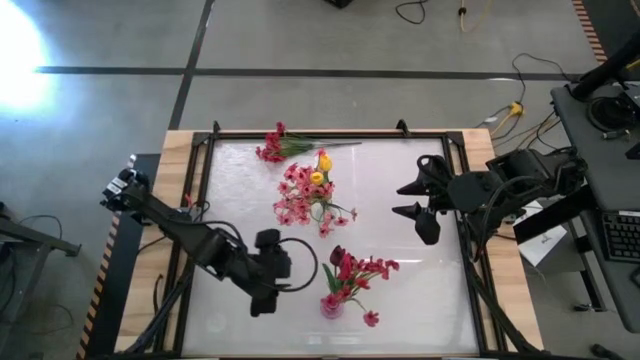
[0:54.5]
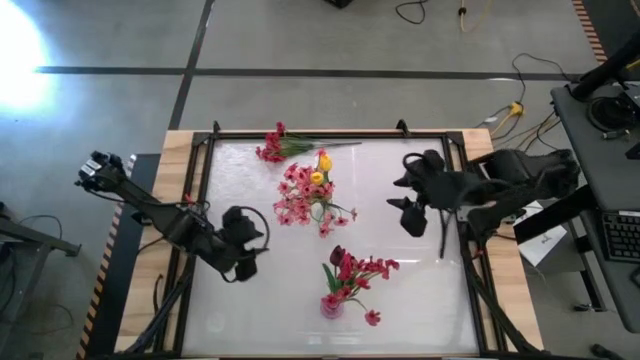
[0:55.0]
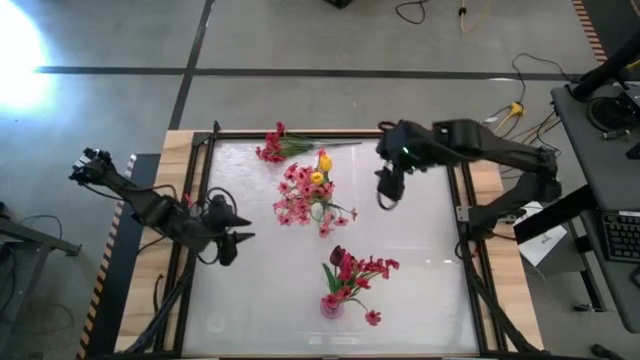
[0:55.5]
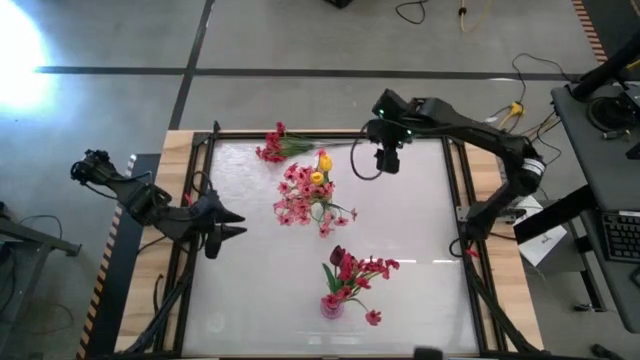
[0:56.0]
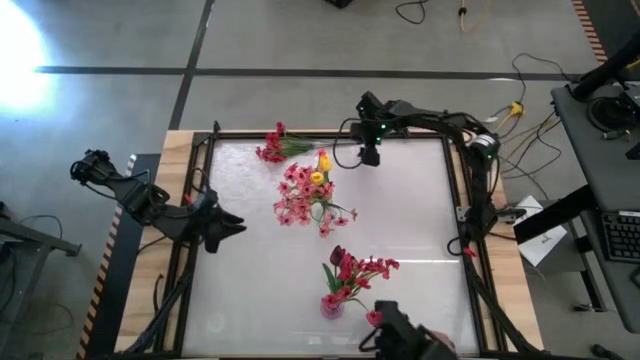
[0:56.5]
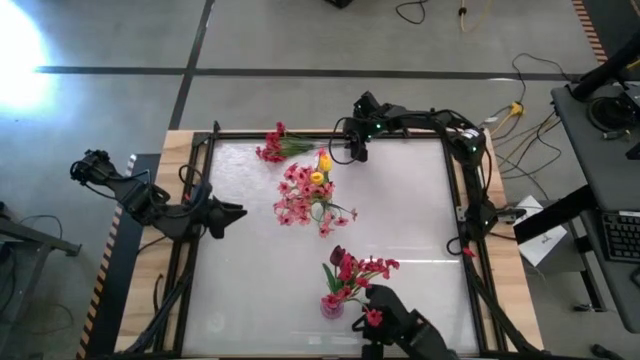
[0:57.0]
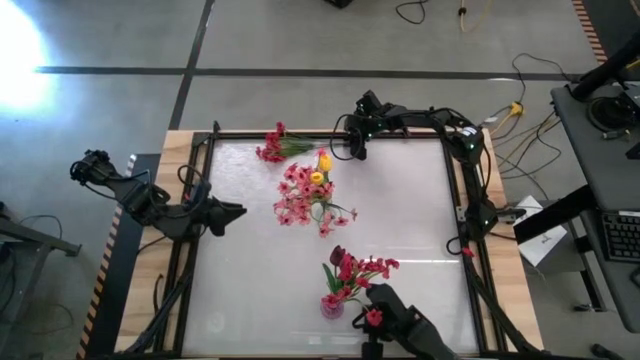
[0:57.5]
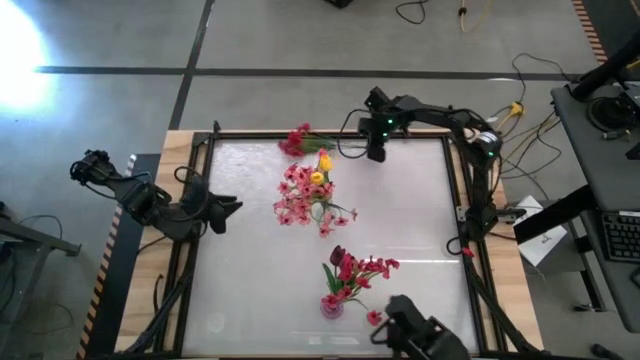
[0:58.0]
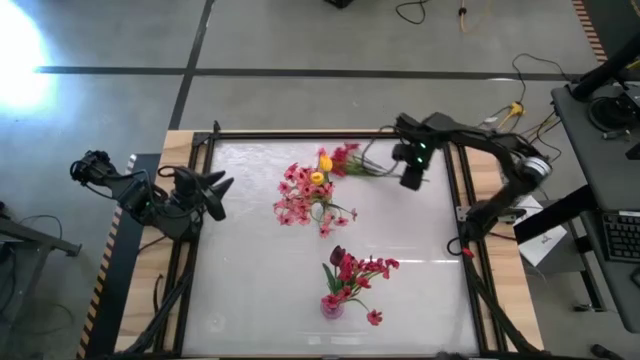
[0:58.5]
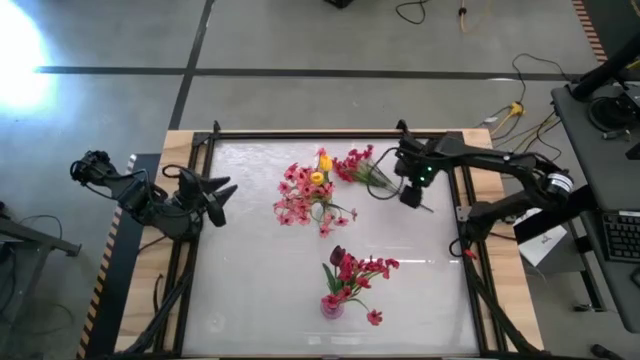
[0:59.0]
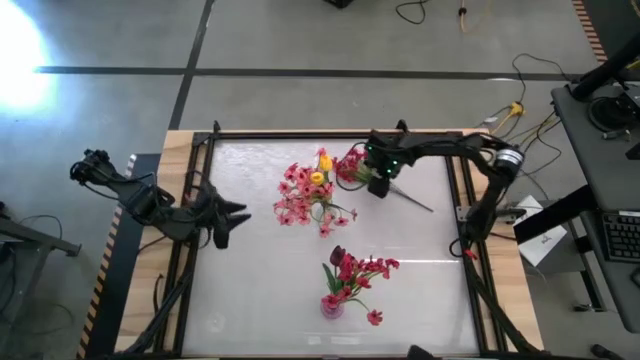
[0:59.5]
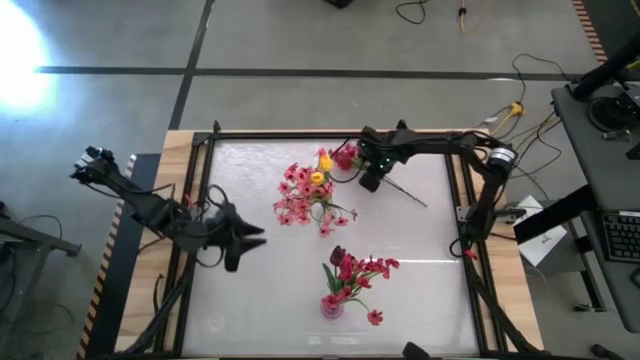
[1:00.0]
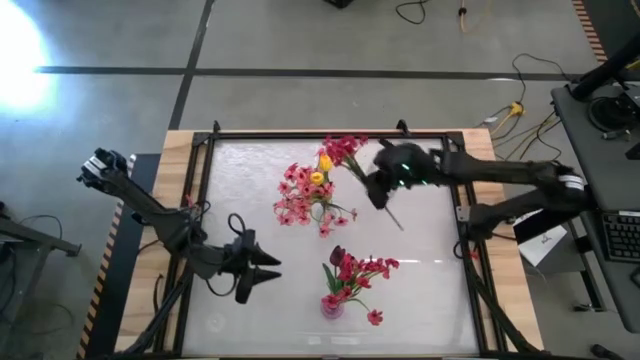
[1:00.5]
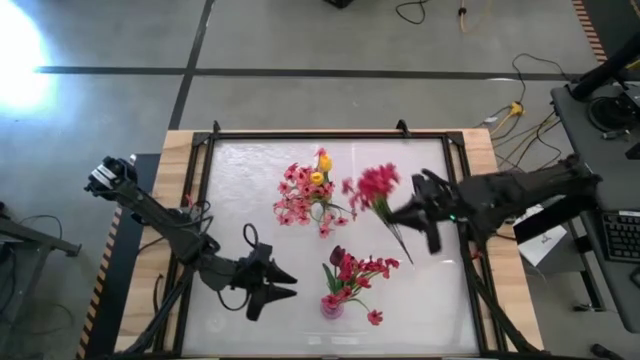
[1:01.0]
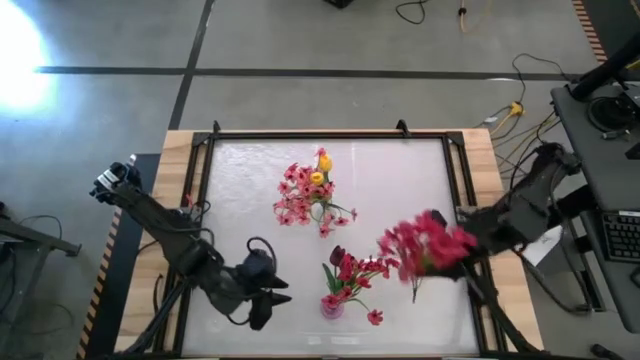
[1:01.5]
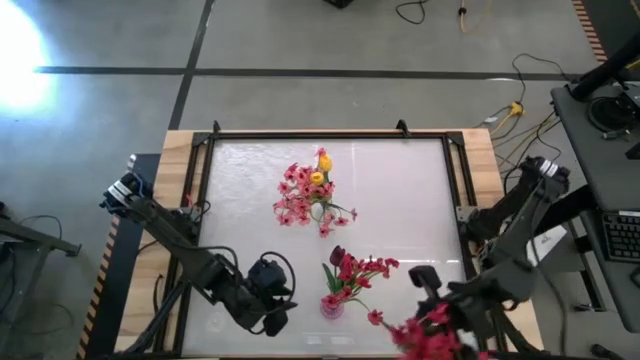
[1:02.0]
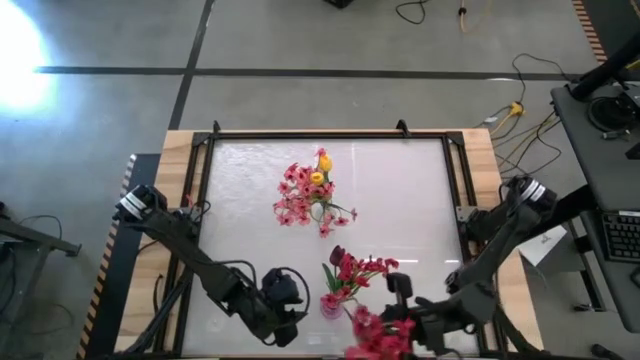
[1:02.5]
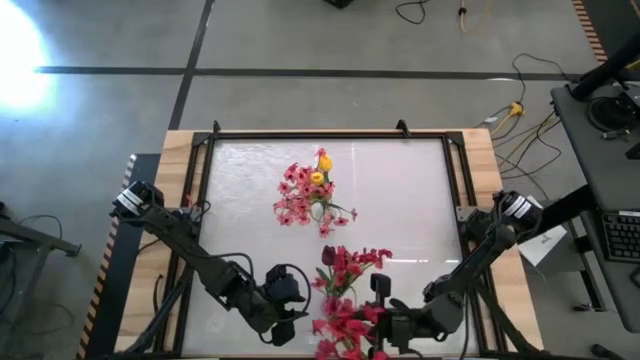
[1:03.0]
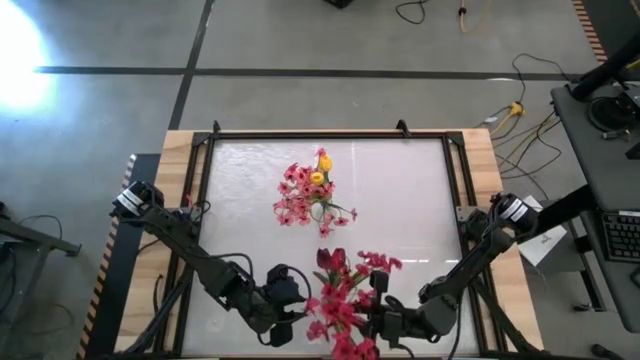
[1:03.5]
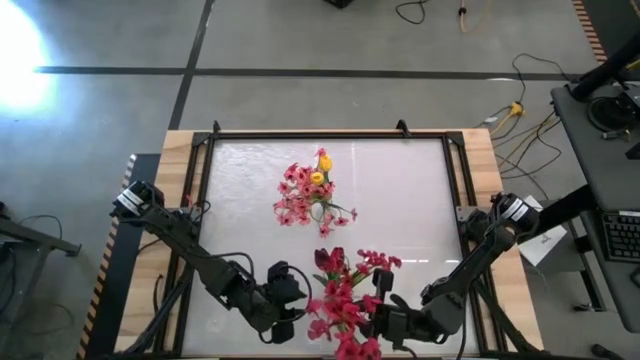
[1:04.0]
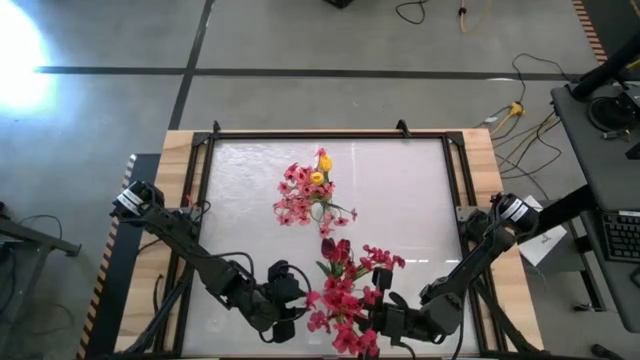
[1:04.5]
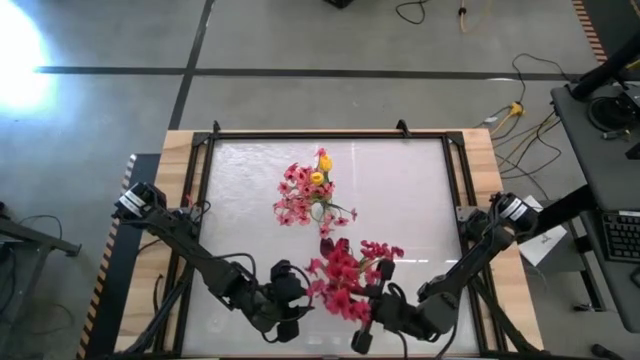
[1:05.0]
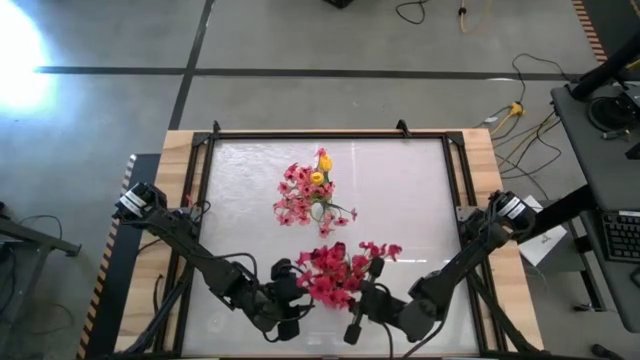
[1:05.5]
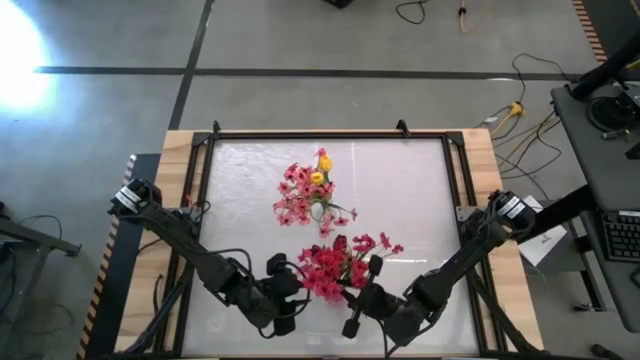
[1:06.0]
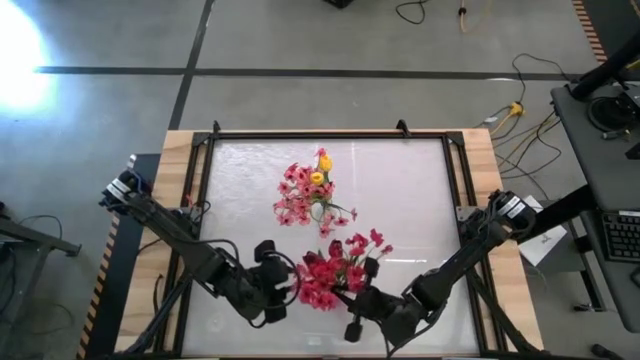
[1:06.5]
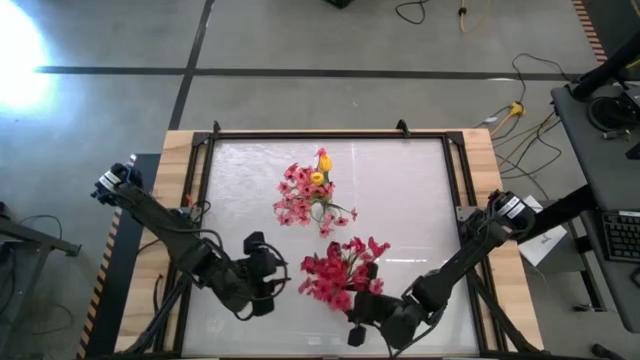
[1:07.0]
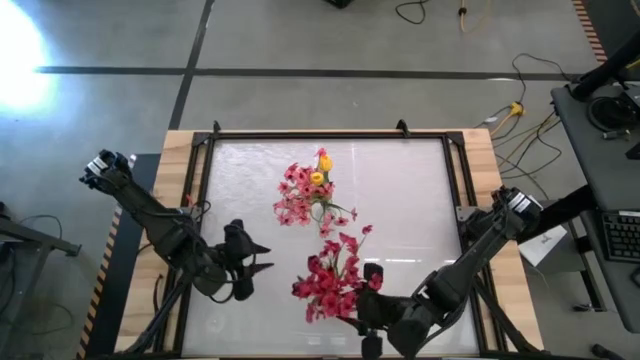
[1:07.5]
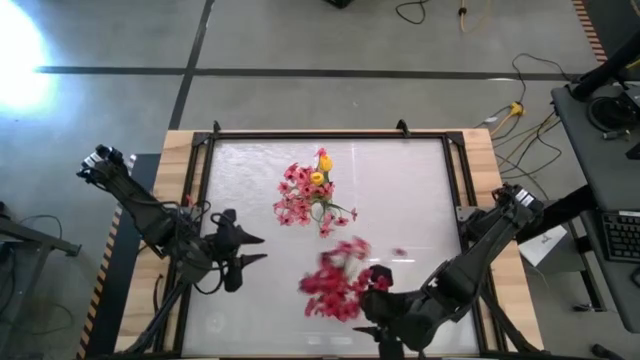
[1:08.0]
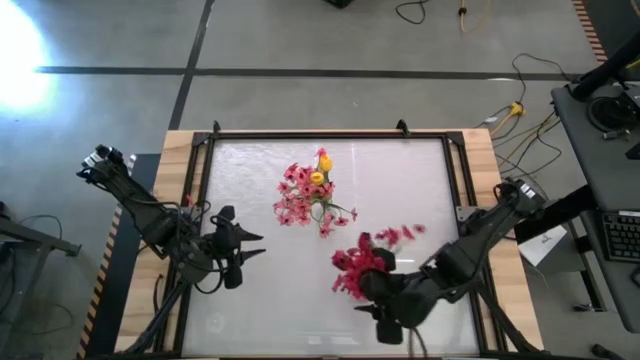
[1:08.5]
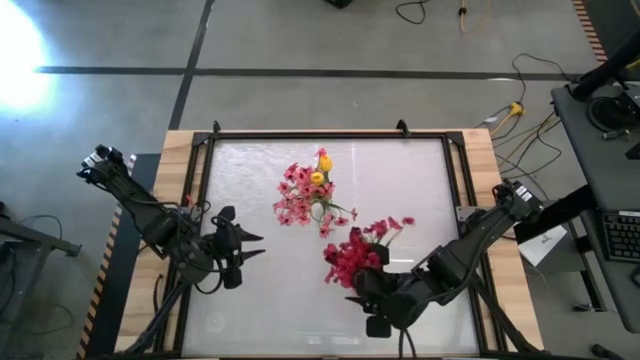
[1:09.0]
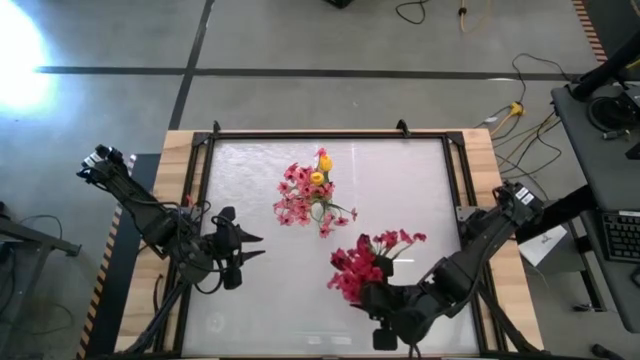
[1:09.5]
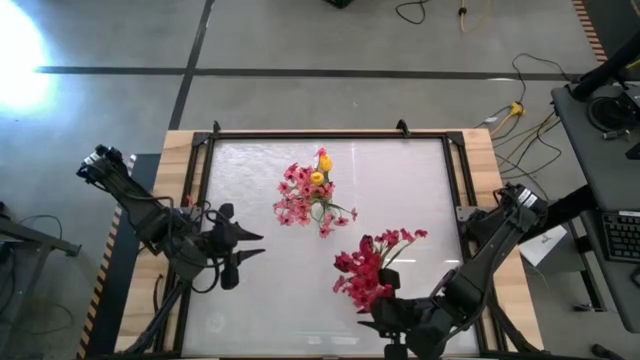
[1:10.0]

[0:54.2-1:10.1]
Task: Sort flowers into vase by color
Put the red flower into the purple vase
